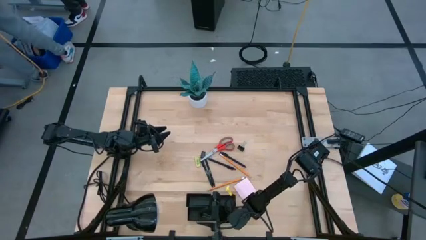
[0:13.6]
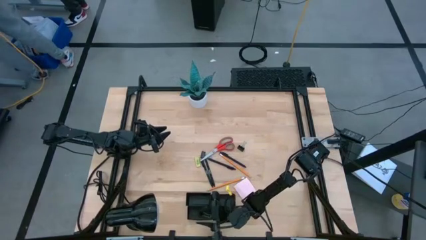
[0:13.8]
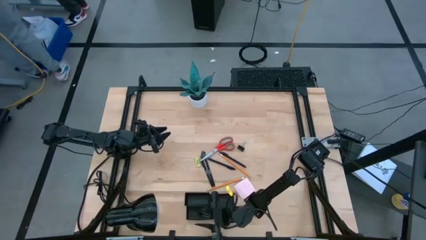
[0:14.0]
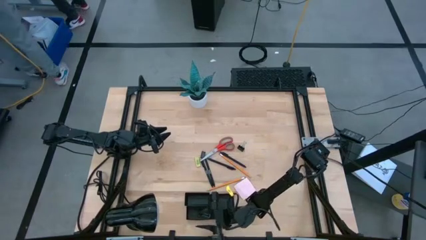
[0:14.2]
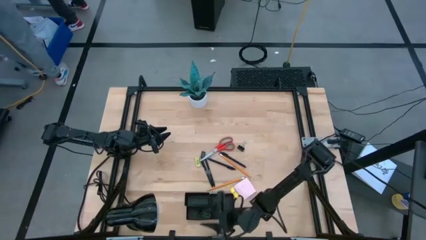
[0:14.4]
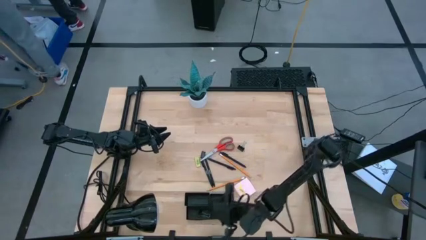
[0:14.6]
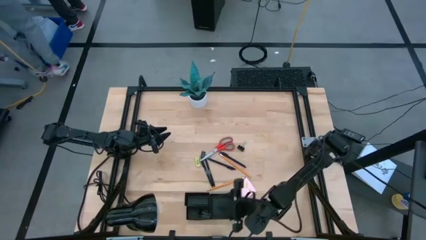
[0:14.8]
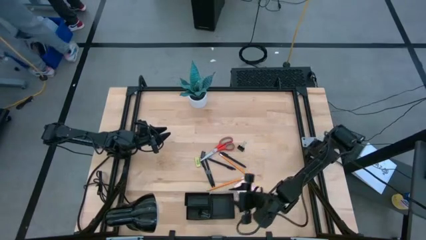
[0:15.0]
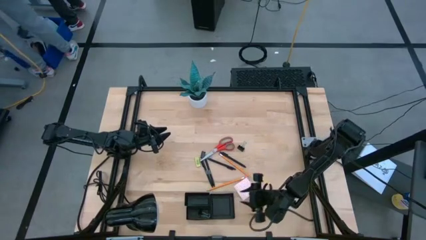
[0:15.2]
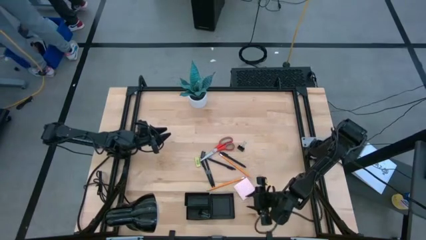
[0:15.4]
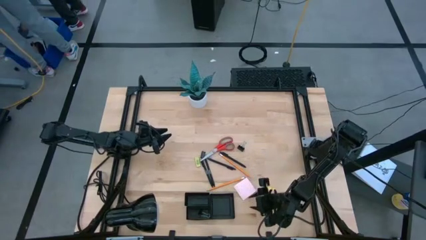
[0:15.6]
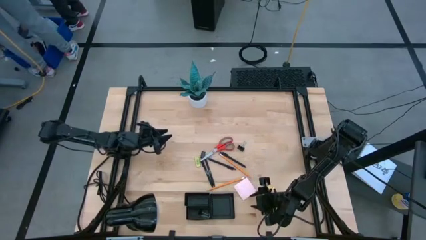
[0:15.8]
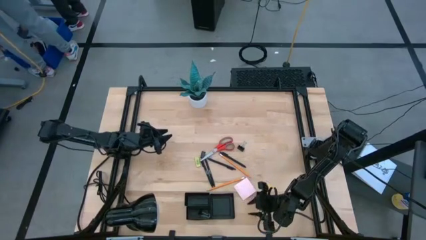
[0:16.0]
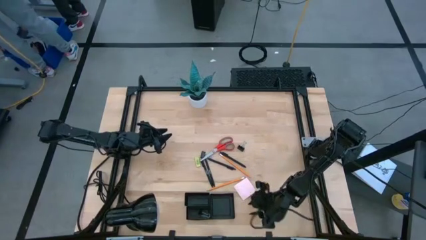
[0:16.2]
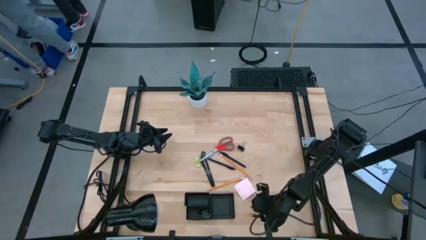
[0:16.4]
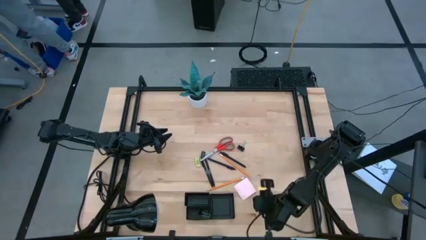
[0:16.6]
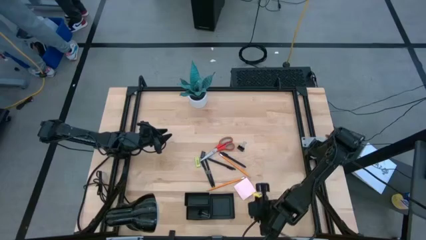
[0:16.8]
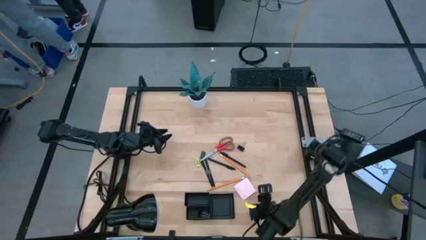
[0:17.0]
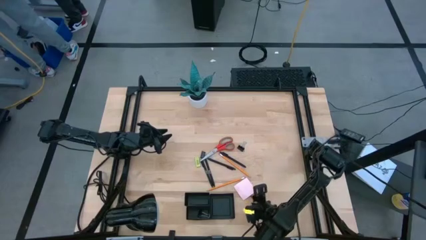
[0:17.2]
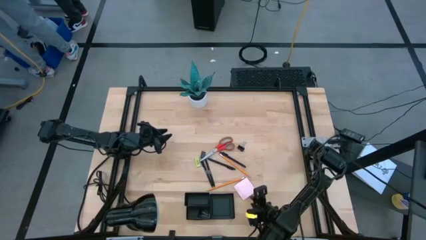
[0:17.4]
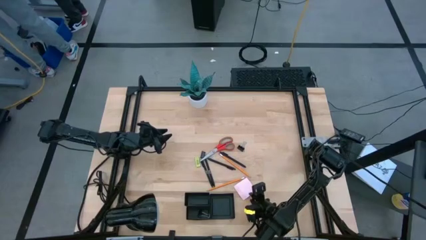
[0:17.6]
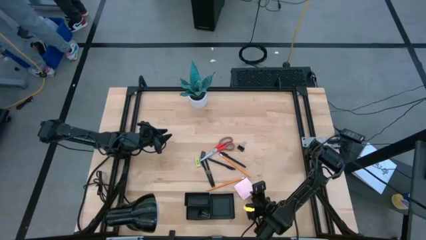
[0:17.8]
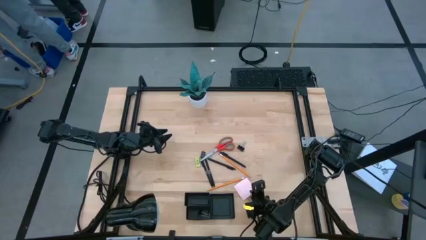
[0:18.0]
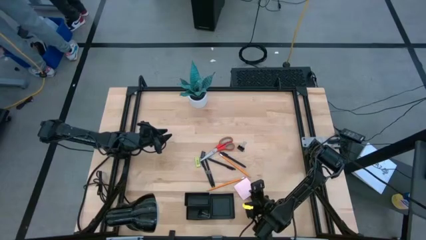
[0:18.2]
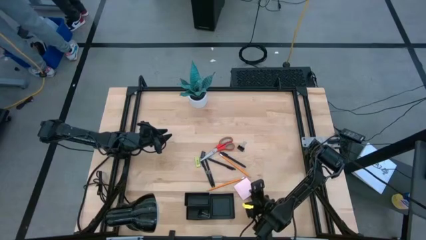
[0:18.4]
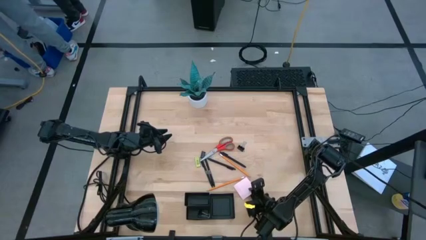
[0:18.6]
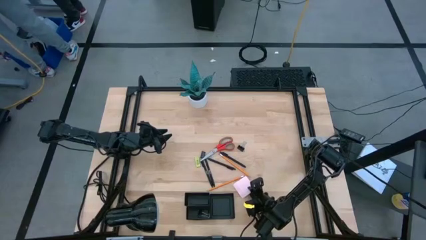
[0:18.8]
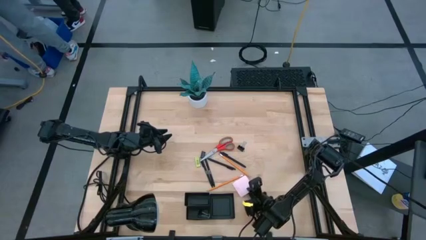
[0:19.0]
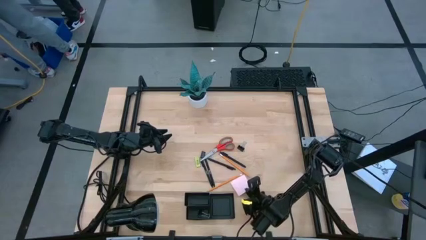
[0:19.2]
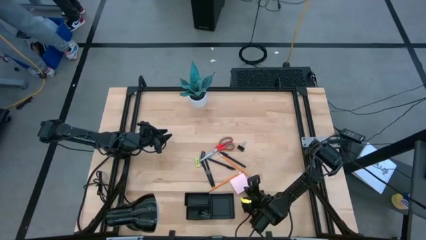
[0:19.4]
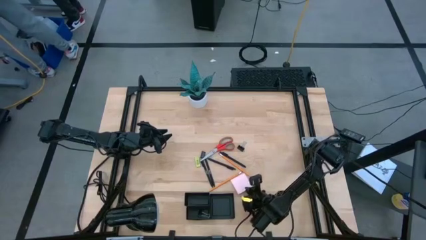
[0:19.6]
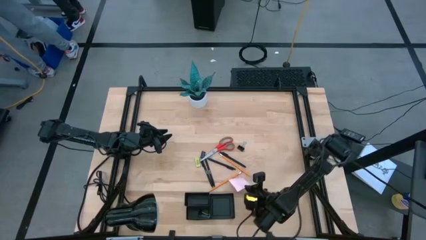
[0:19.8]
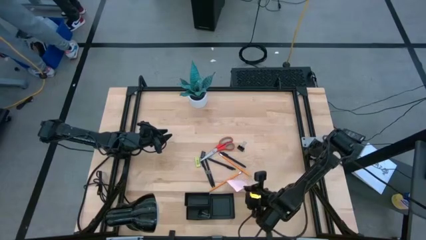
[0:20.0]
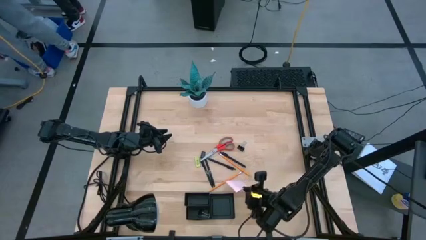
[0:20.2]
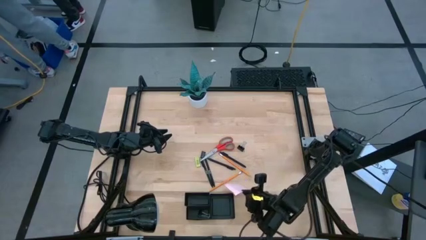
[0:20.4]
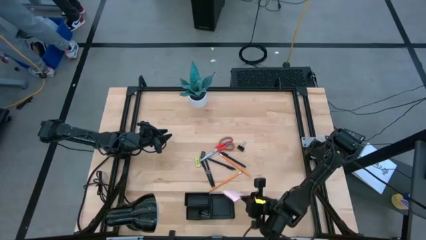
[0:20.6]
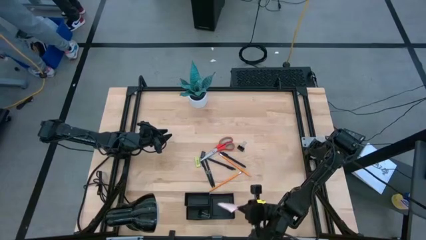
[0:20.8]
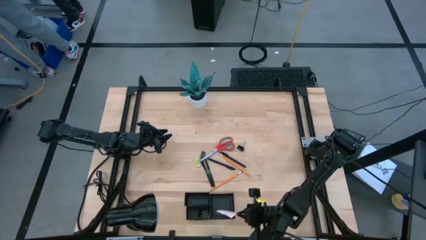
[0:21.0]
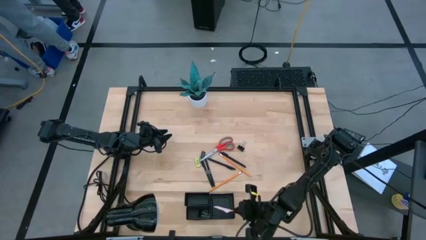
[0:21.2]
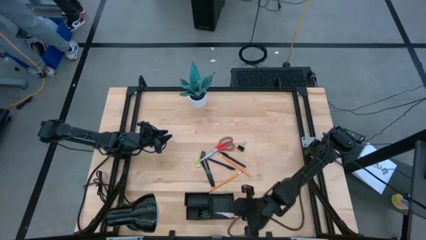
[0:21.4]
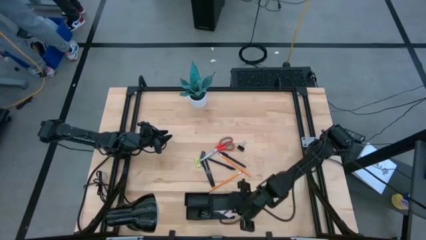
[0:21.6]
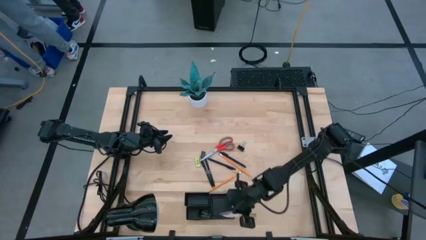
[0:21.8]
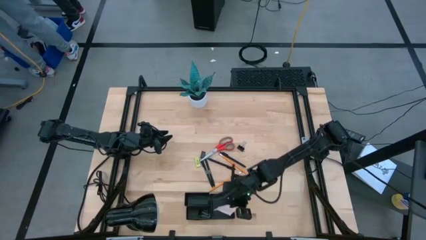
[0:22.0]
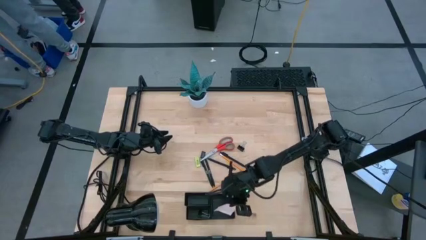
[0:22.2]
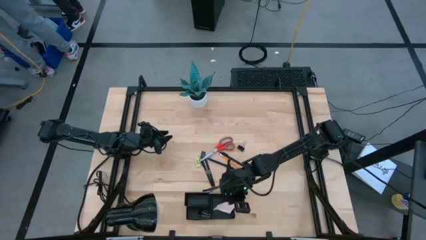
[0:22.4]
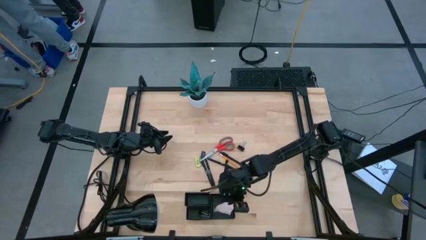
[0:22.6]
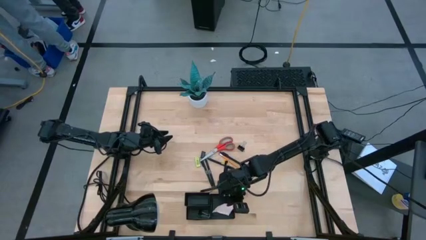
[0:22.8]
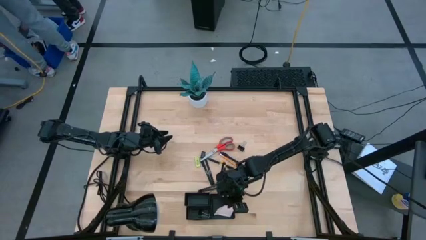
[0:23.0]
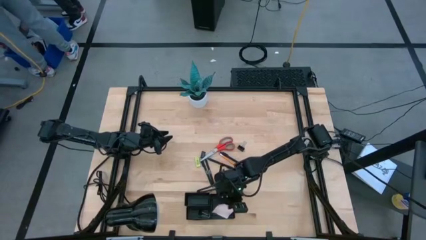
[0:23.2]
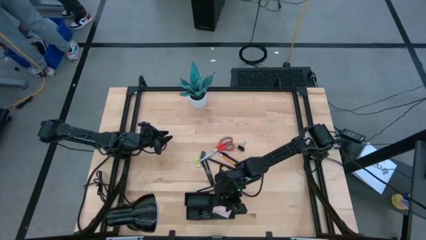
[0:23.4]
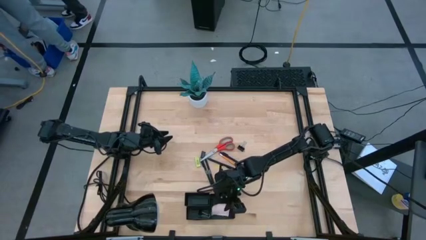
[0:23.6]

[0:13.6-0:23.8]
Task: Pick and place office supplies into organizer
Put the pink sticky notes into the black desk organizer

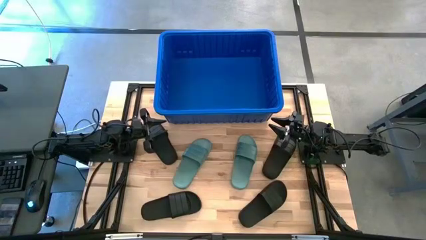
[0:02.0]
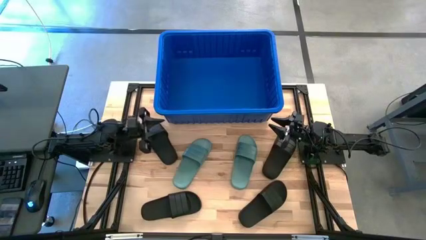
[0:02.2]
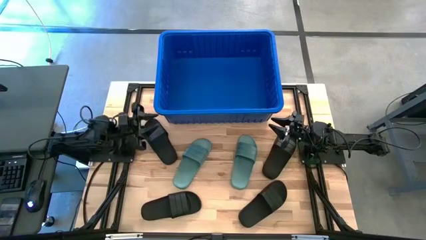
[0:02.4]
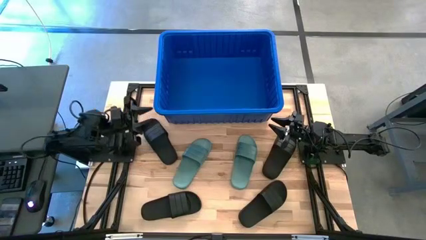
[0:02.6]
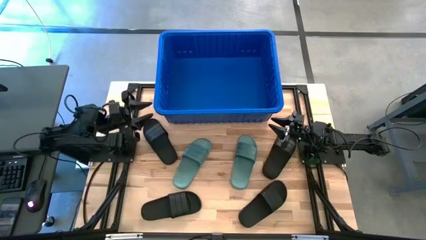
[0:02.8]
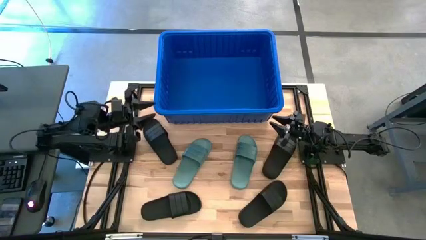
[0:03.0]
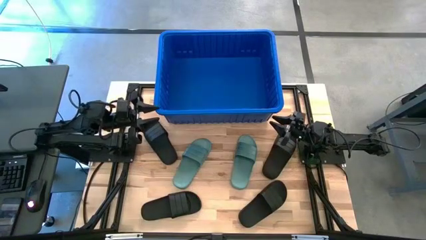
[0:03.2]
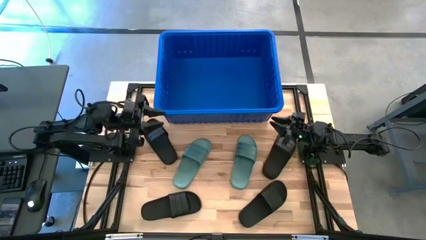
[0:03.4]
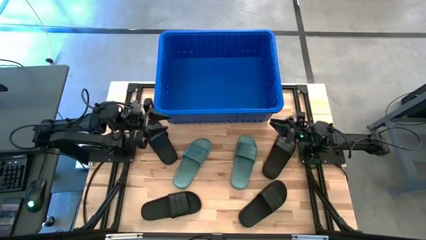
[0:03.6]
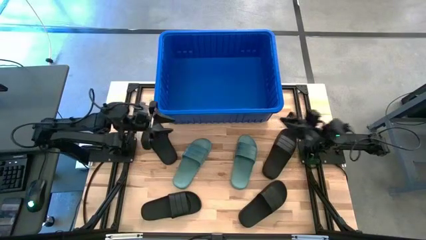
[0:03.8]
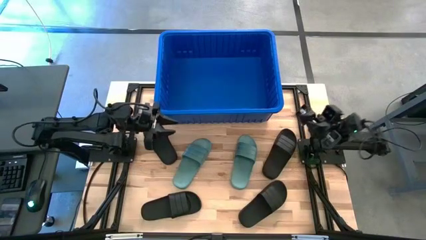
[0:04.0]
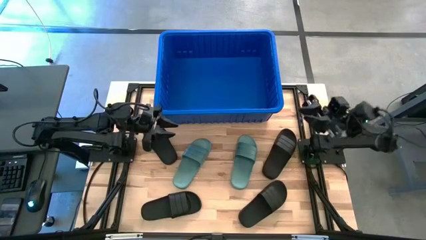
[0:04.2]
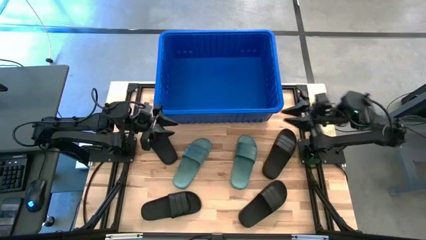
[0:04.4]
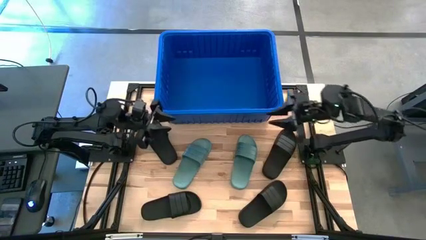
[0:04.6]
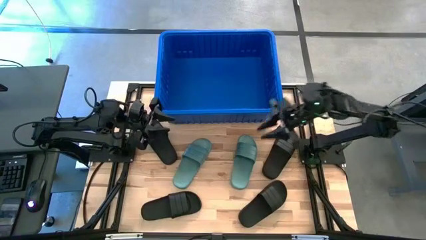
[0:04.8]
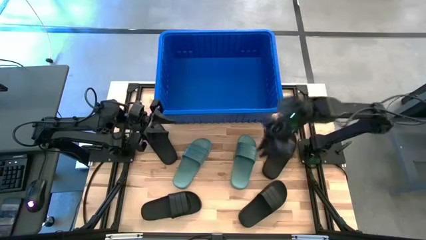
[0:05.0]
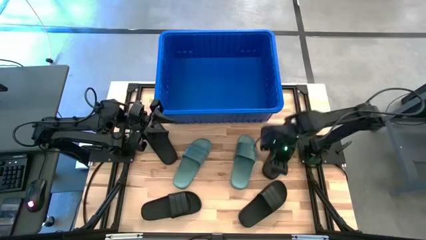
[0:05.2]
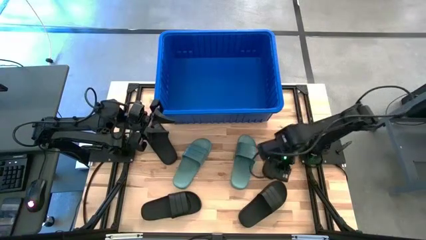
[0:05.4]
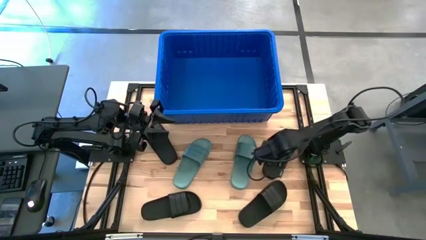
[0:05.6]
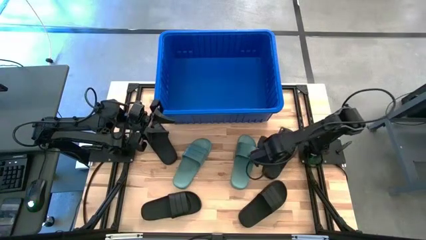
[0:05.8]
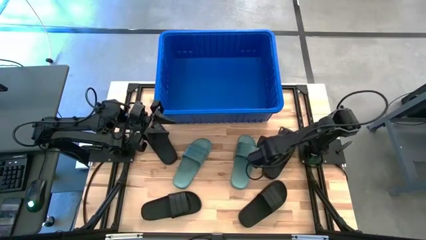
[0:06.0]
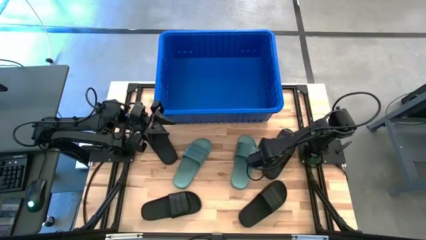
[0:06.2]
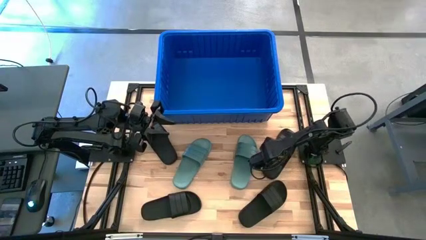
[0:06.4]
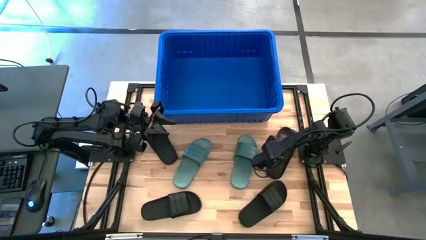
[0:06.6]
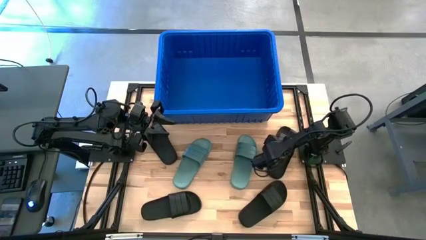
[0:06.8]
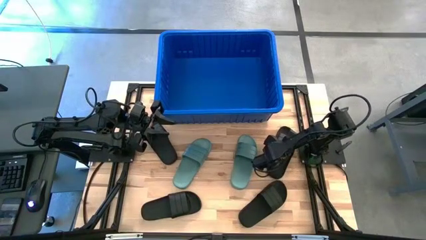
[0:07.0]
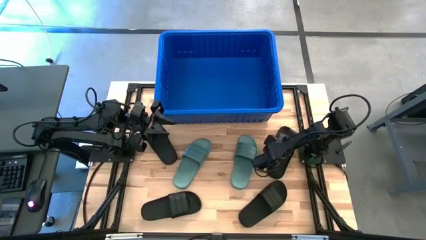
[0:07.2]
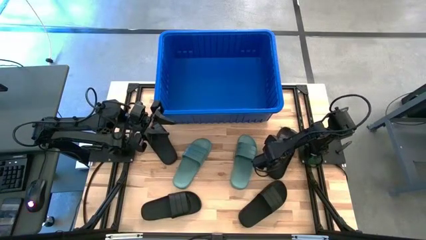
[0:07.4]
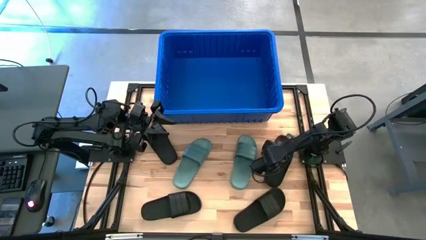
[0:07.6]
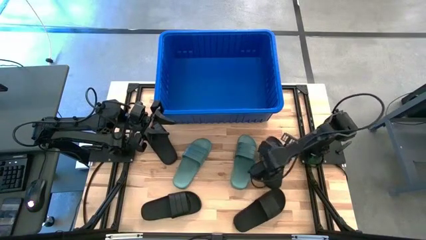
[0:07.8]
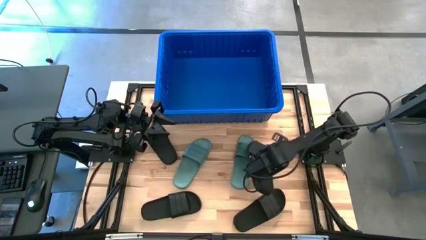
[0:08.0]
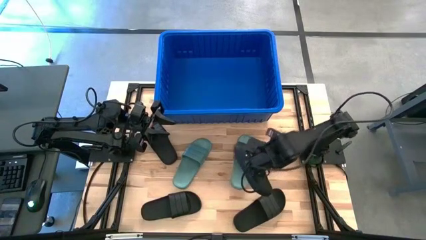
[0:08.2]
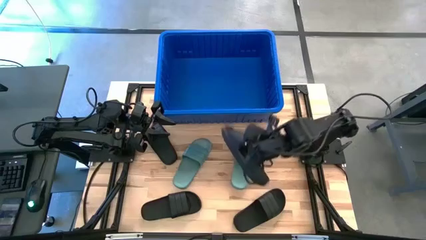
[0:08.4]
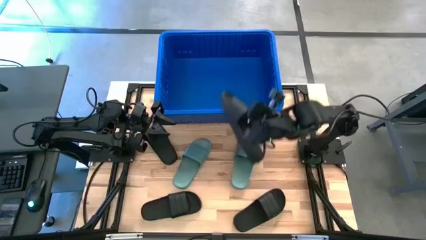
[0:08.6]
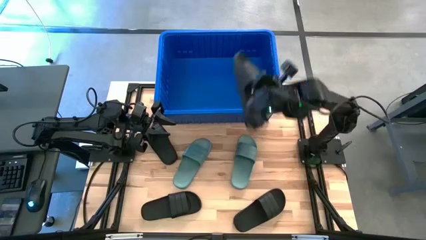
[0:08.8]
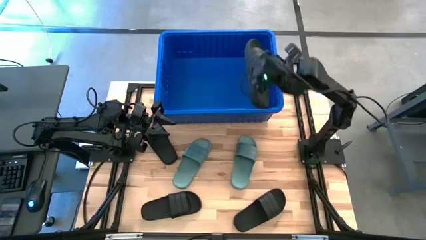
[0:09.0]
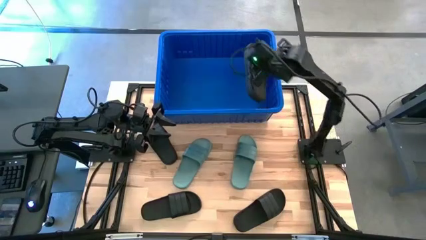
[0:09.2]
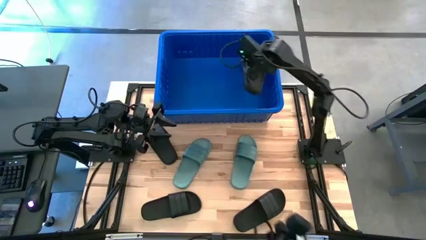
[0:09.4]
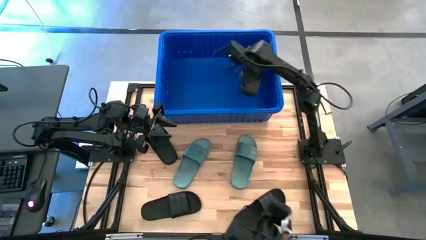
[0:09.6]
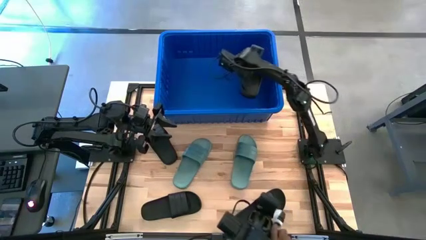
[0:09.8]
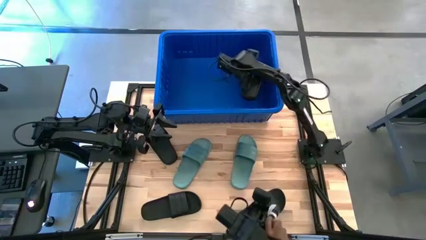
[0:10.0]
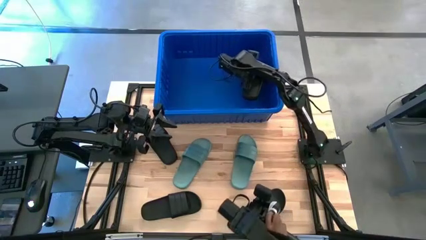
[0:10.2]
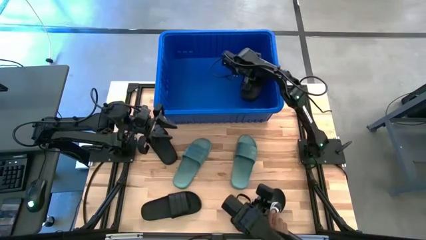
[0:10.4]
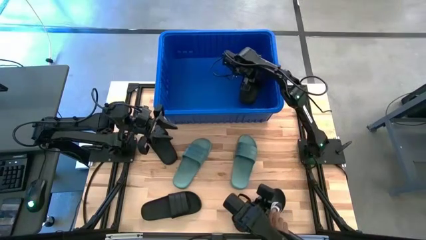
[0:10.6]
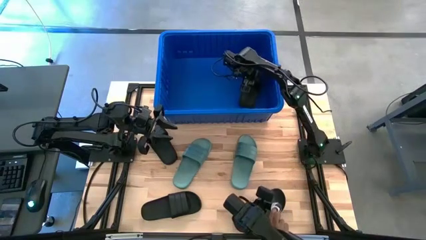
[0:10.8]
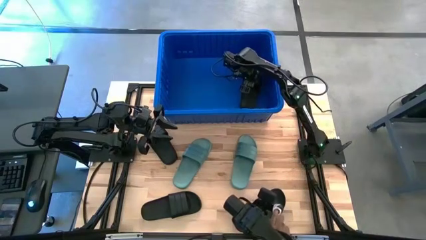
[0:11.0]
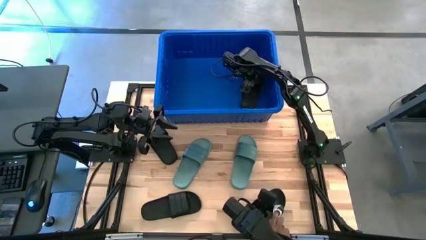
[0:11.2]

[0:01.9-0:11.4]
Task: Pick and place slides into bin
Put the top right black slide into the bin
